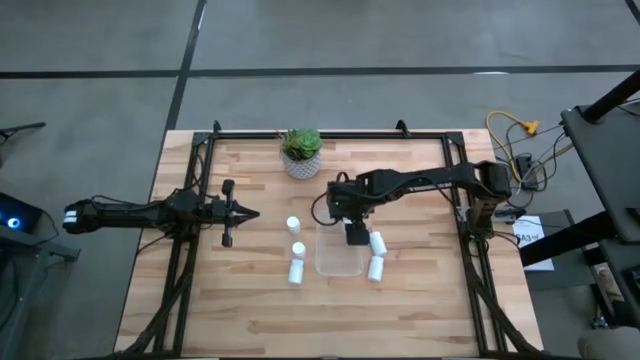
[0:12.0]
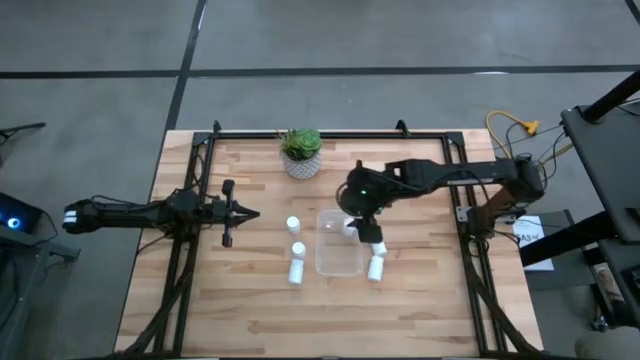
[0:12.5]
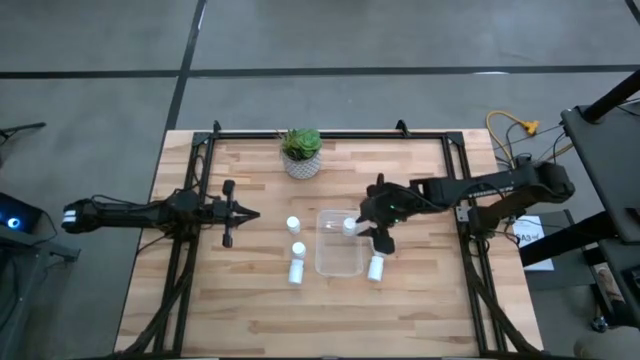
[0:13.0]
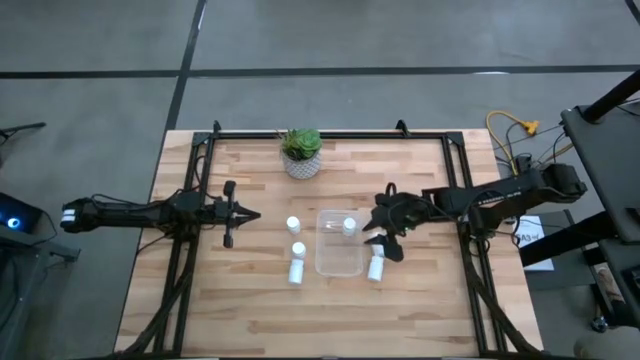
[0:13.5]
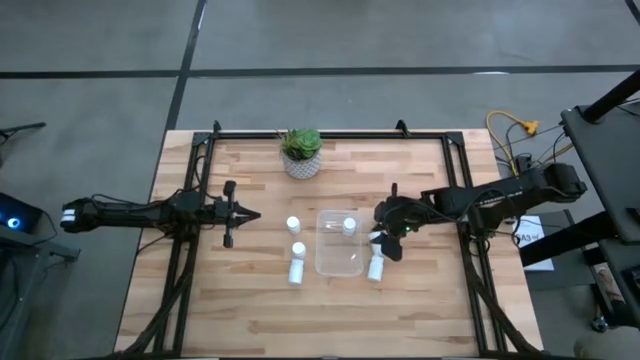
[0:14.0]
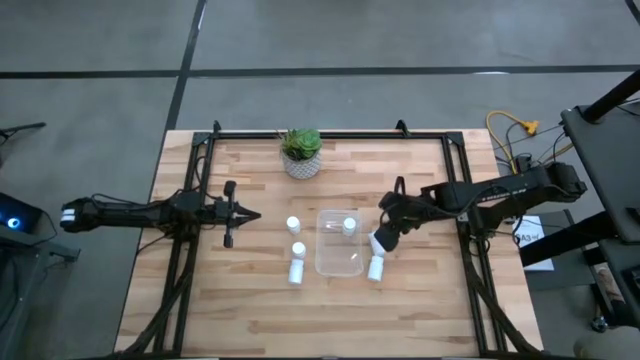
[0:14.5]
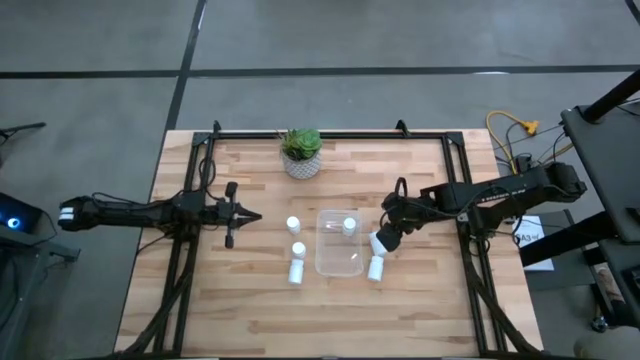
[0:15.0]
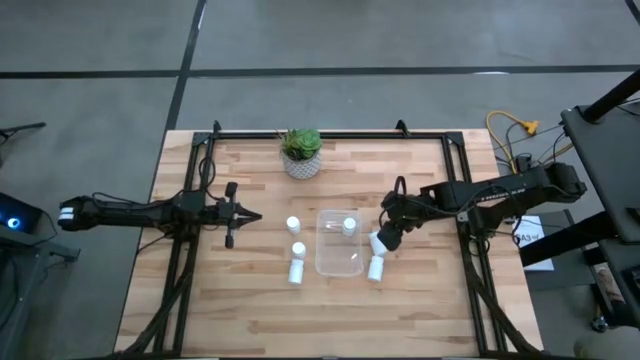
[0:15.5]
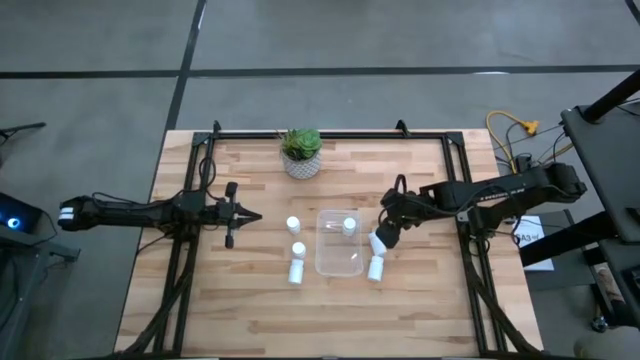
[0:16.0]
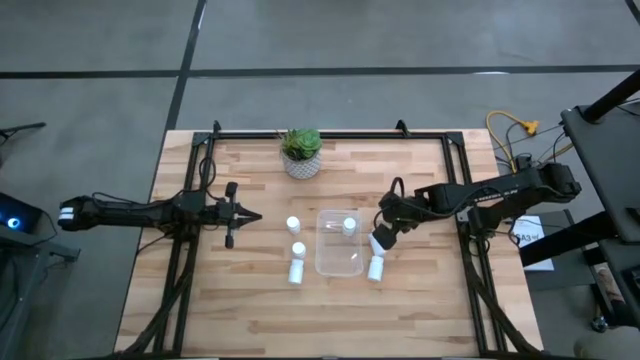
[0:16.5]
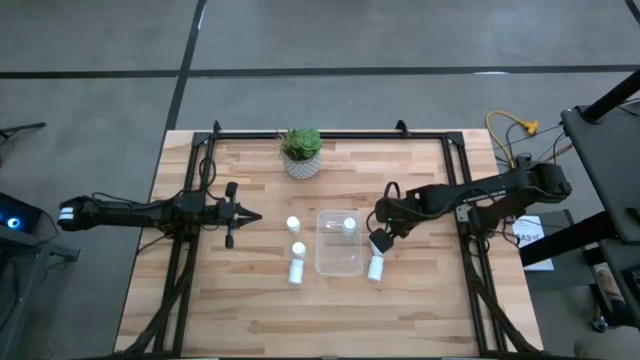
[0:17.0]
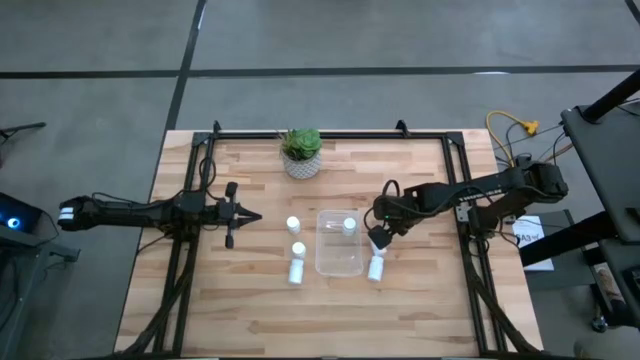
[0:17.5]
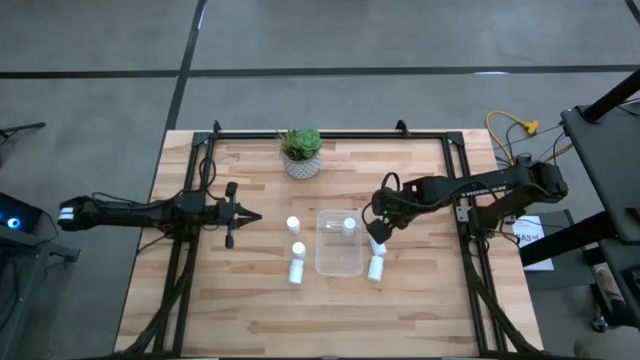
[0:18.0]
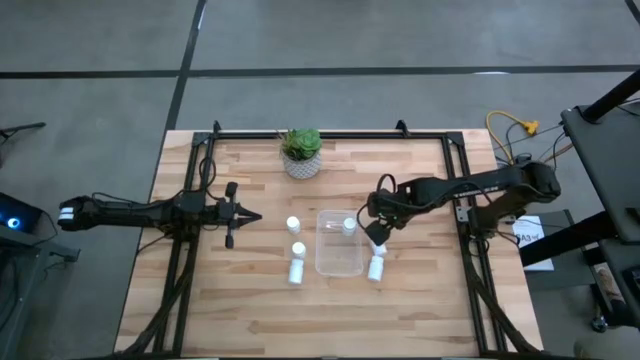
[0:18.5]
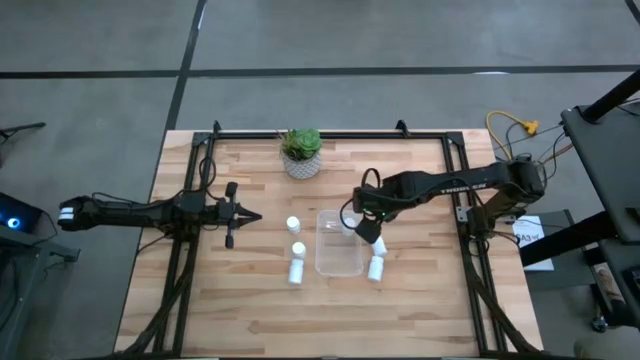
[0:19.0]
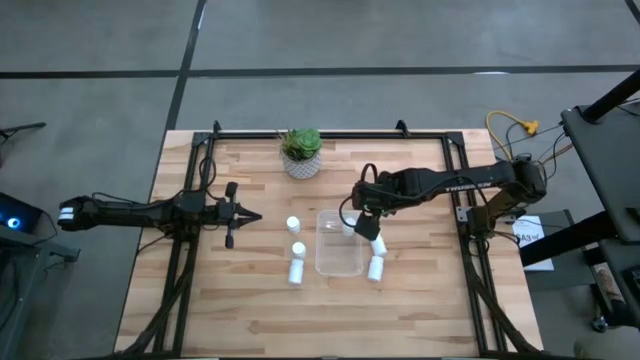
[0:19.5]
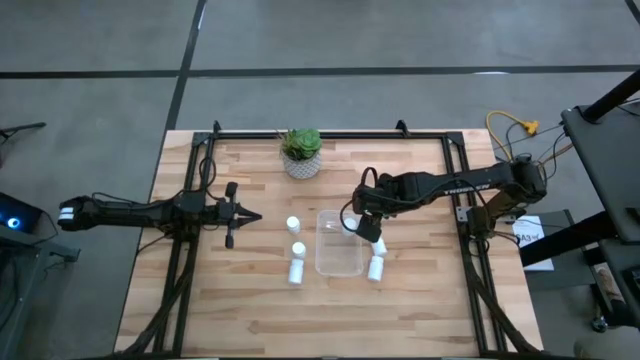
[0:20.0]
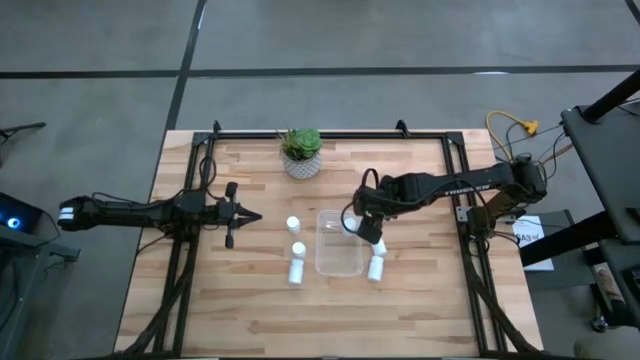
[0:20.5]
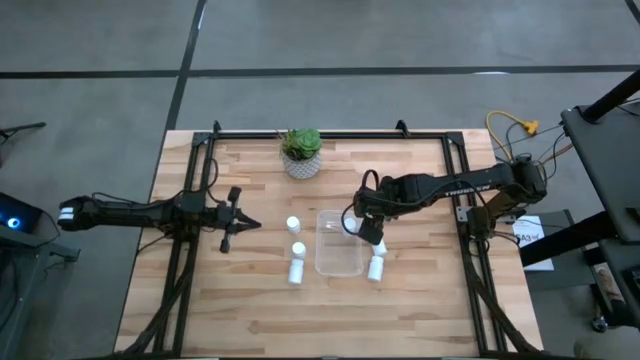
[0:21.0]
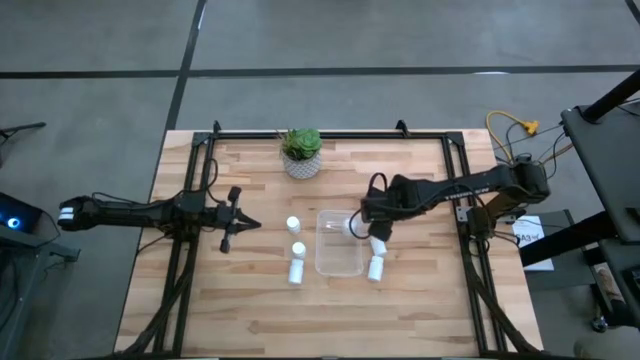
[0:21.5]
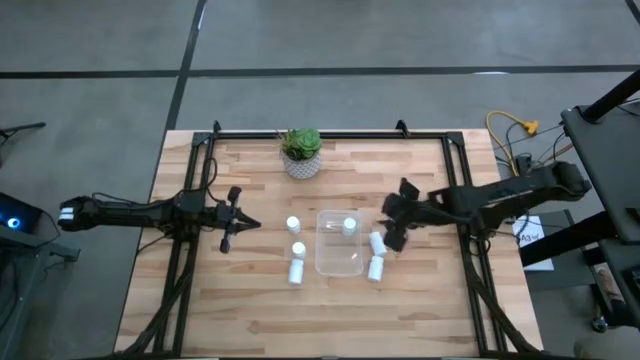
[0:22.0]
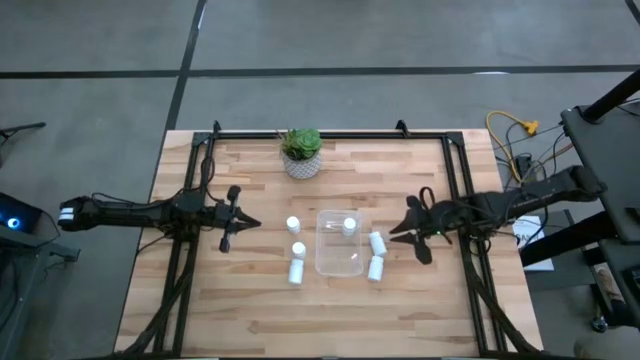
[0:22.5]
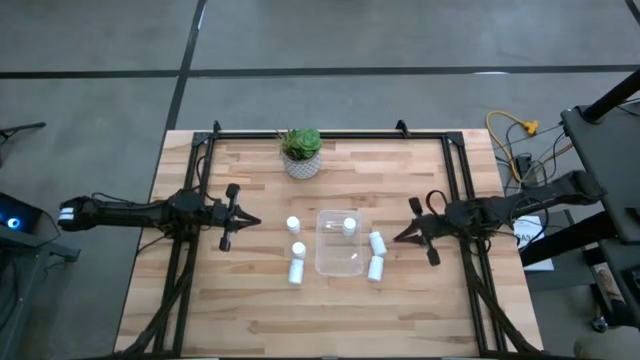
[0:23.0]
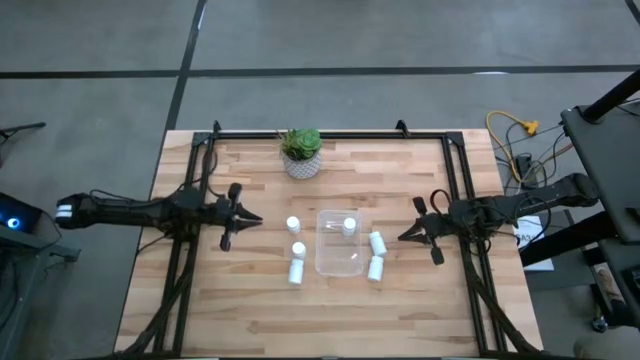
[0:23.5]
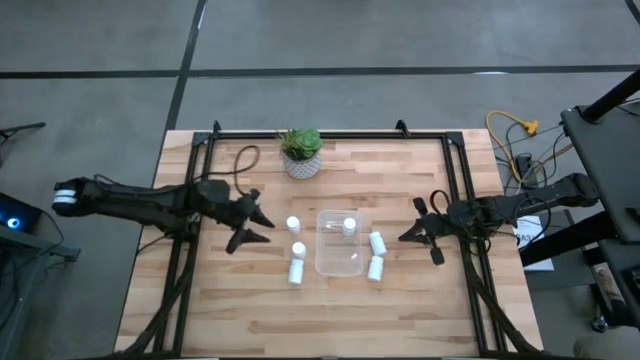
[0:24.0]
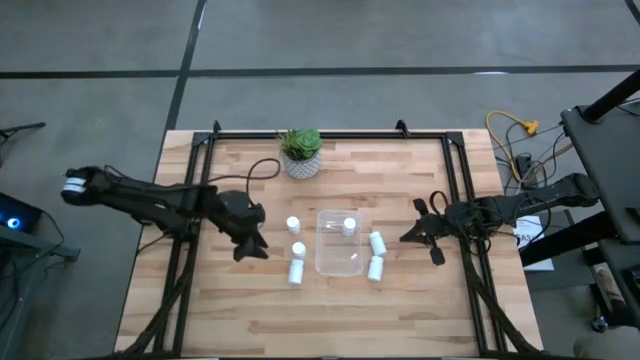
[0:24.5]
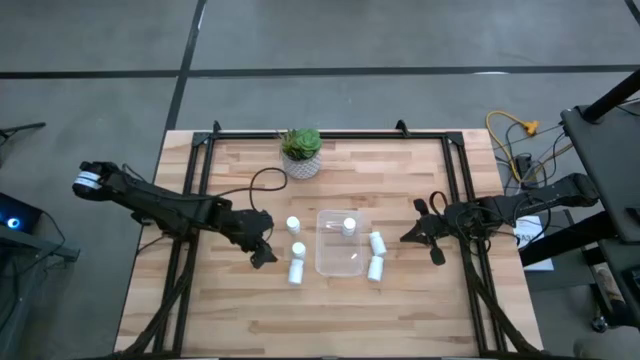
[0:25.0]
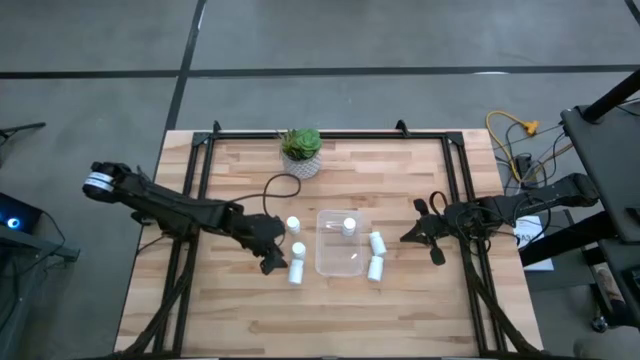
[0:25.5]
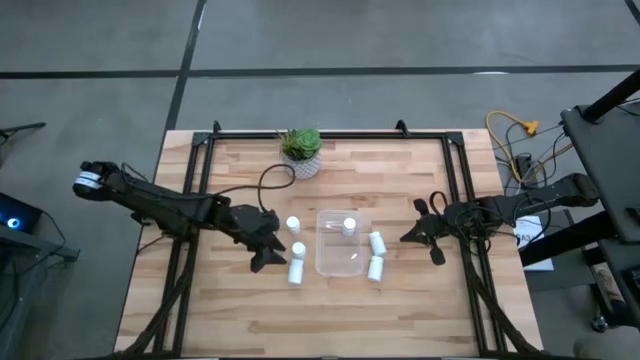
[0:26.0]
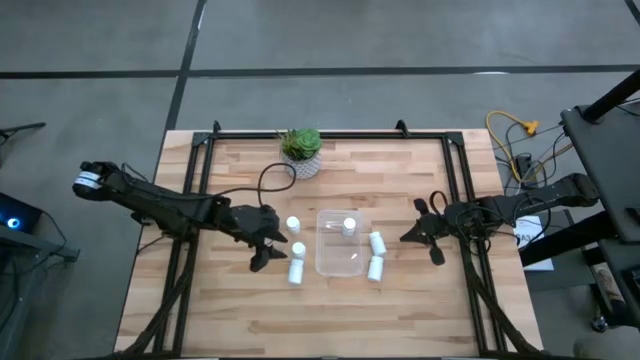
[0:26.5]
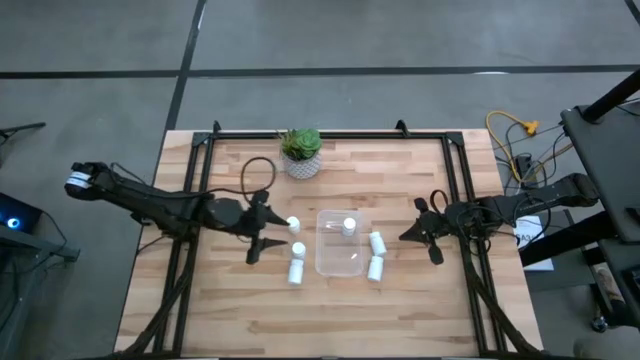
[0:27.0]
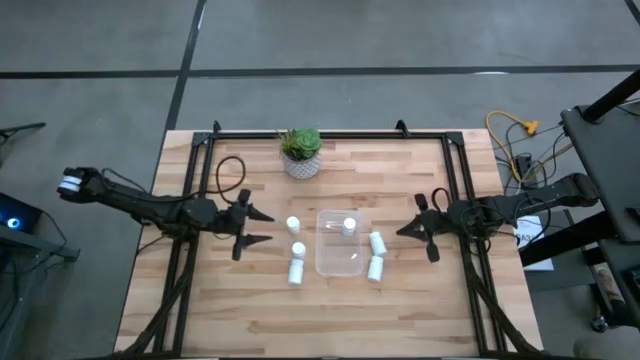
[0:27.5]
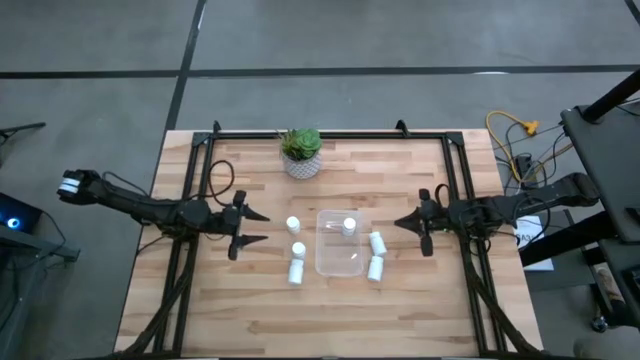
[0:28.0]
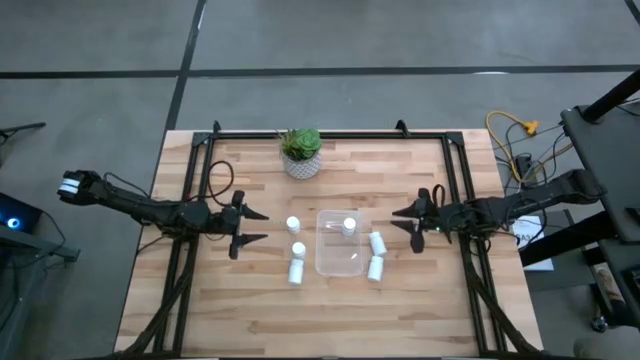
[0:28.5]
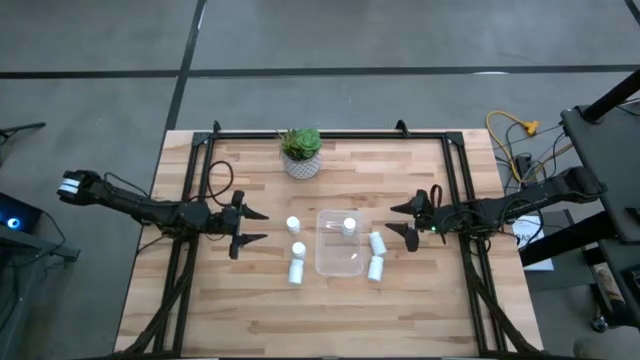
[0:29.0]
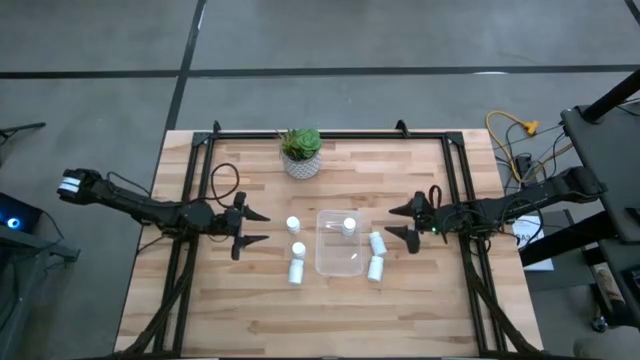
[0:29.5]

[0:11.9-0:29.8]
Task: Pick and place pill bottles into a basket
Put the white medicine bottle into the transparent bin

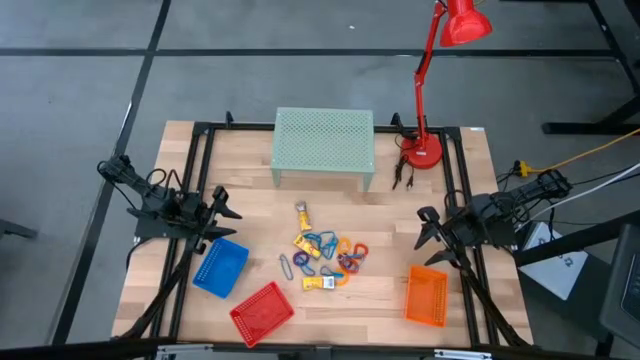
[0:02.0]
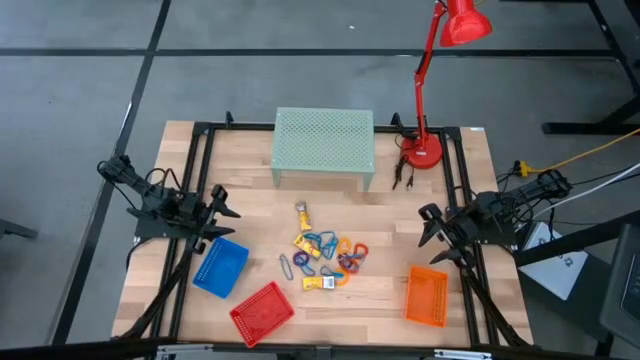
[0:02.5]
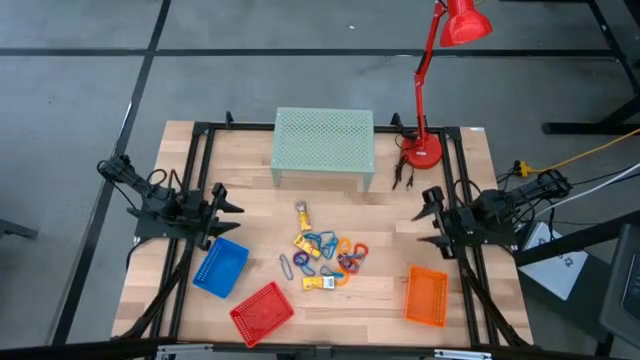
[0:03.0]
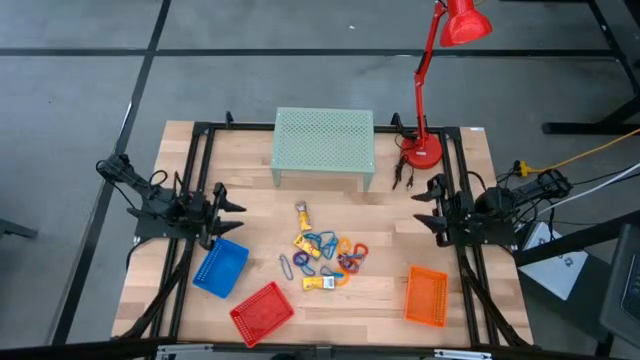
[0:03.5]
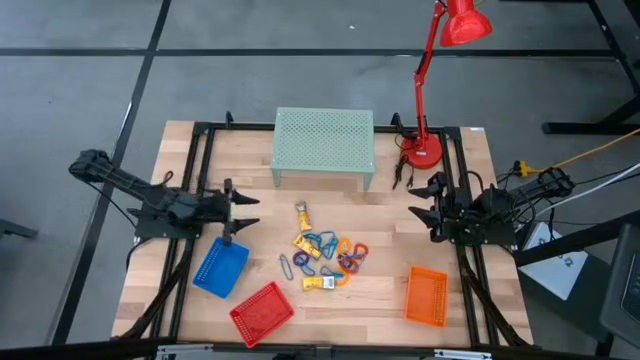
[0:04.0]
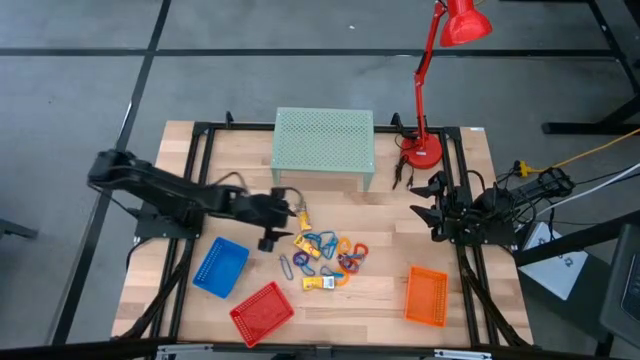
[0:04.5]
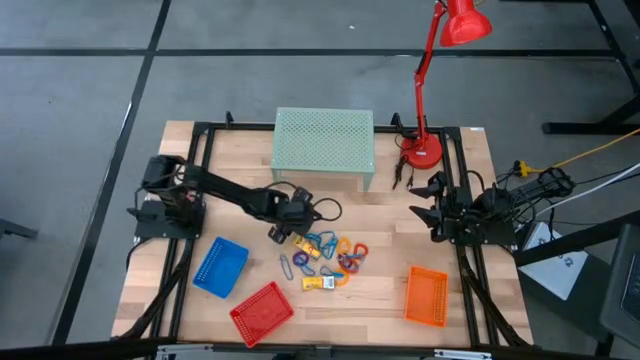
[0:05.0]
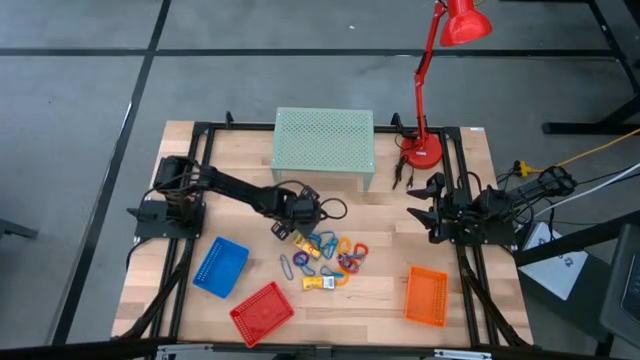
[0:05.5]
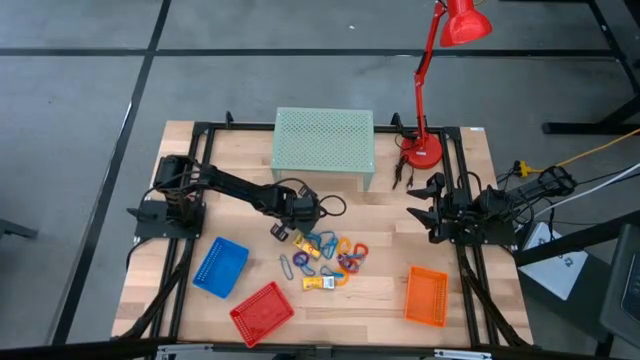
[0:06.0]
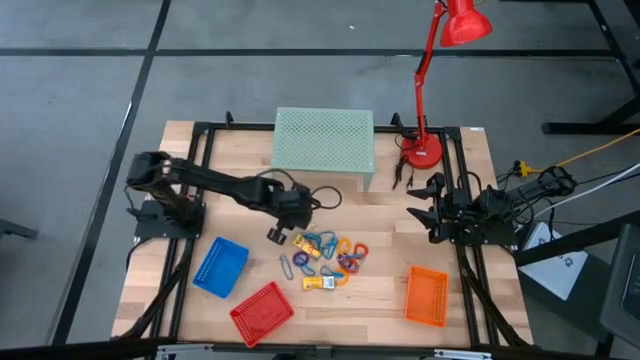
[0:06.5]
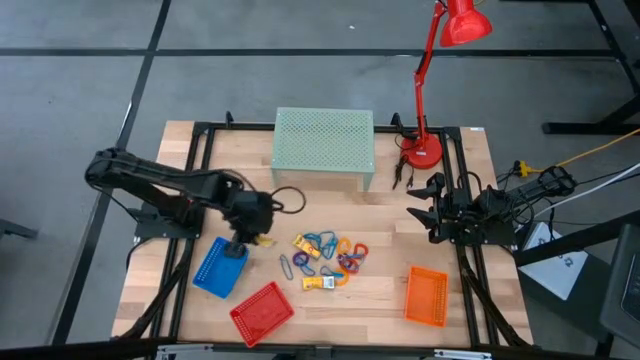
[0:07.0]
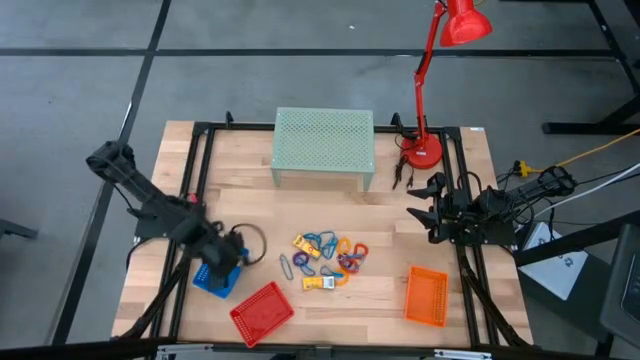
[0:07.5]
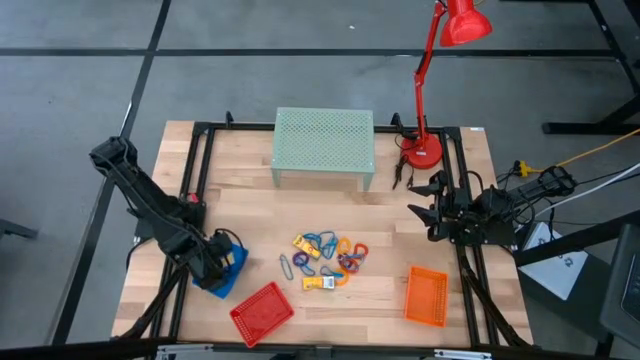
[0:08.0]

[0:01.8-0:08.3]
Task: Pick & Place Office Desk Supplies
Put the yellow crayon pack into the blue bin
